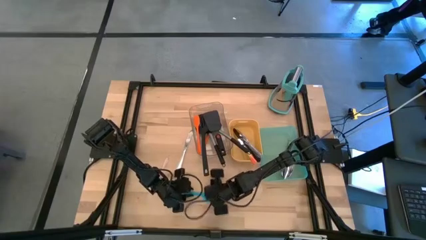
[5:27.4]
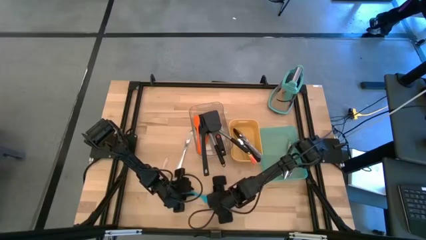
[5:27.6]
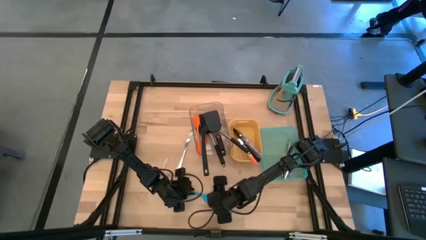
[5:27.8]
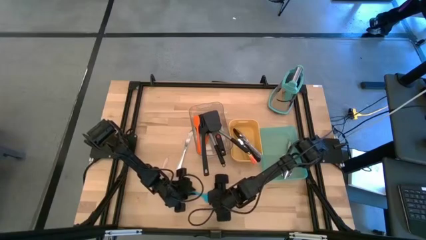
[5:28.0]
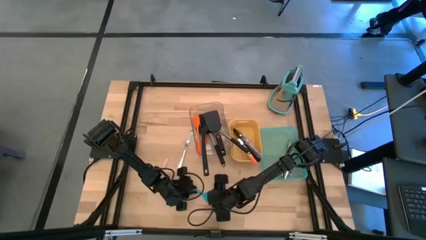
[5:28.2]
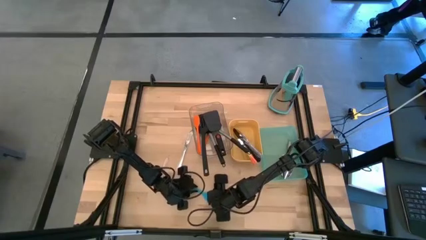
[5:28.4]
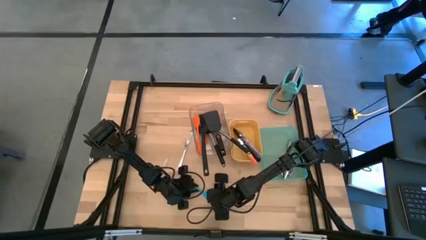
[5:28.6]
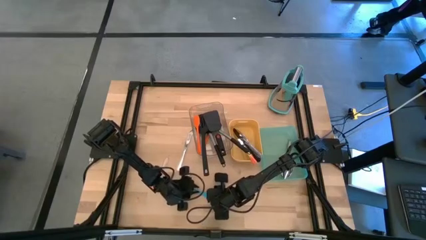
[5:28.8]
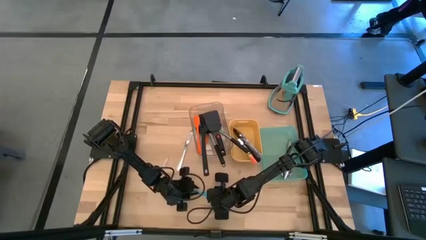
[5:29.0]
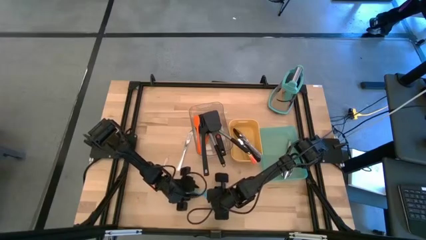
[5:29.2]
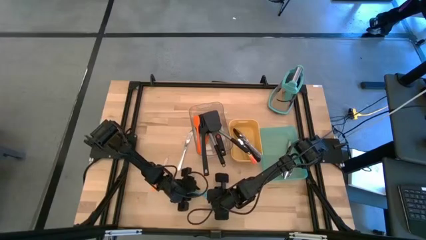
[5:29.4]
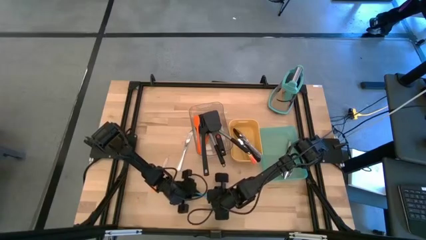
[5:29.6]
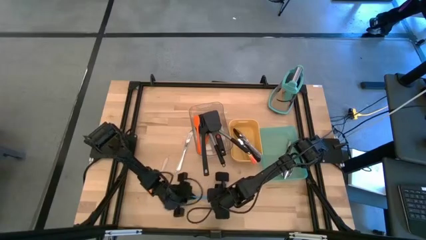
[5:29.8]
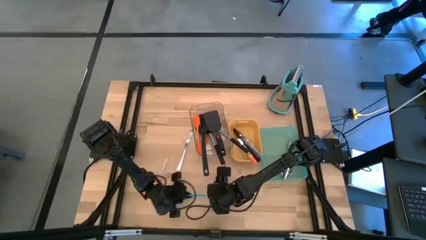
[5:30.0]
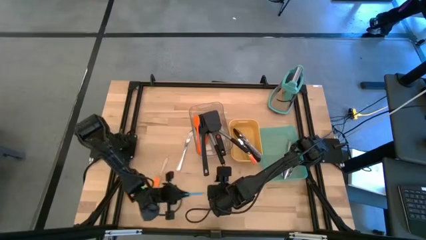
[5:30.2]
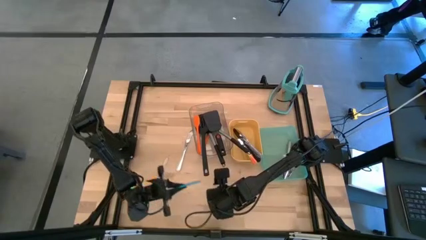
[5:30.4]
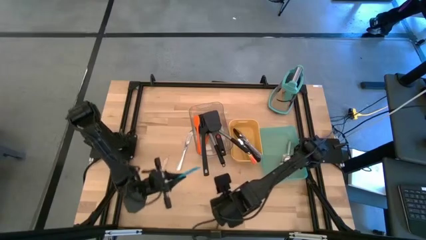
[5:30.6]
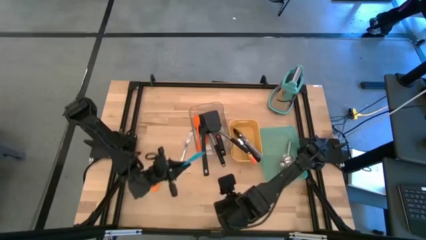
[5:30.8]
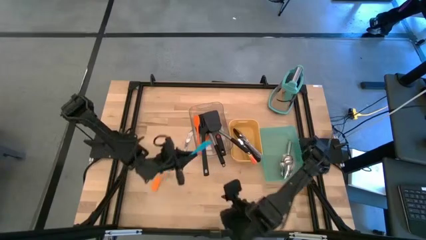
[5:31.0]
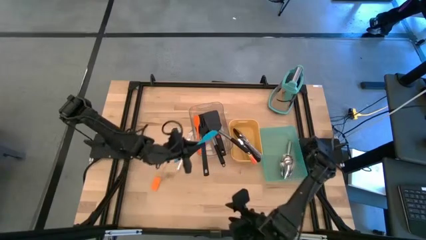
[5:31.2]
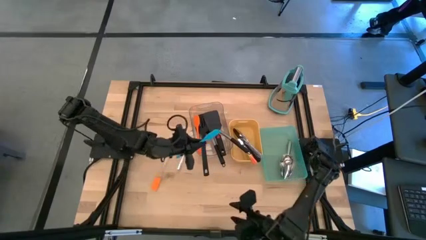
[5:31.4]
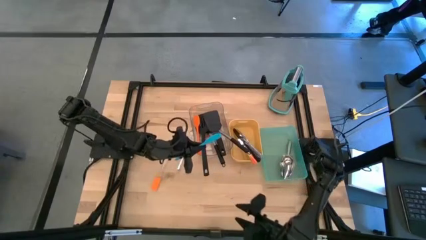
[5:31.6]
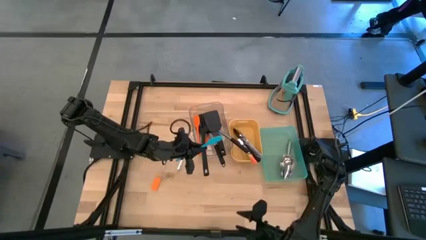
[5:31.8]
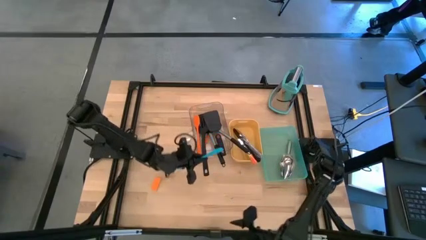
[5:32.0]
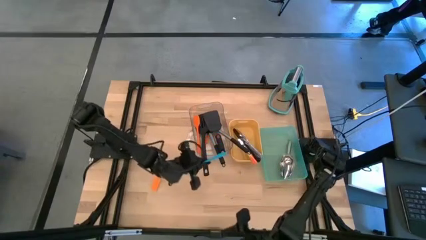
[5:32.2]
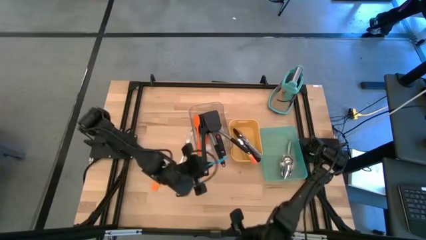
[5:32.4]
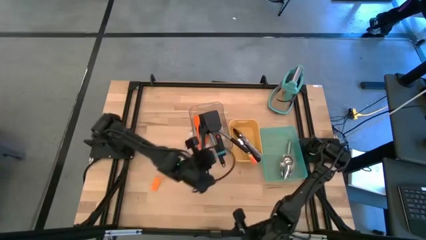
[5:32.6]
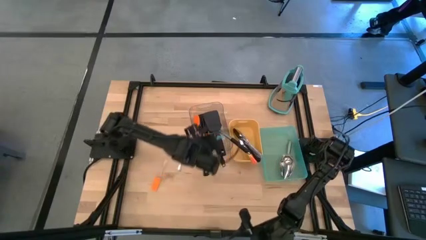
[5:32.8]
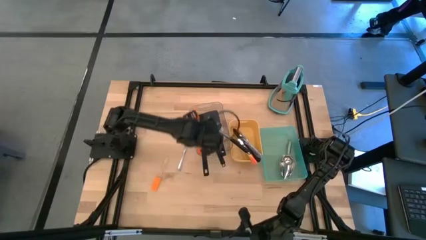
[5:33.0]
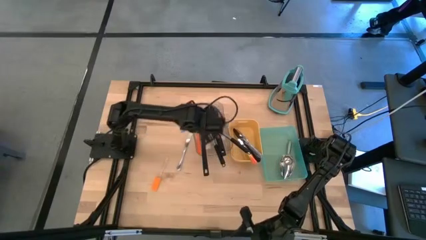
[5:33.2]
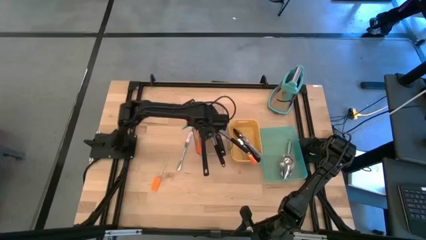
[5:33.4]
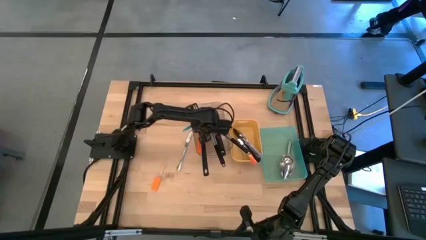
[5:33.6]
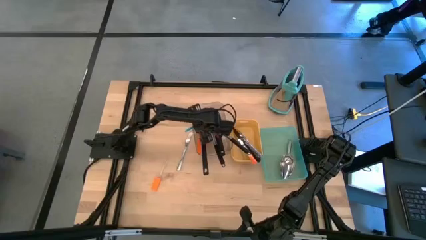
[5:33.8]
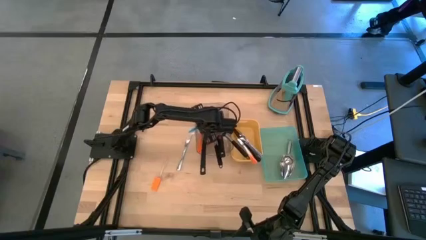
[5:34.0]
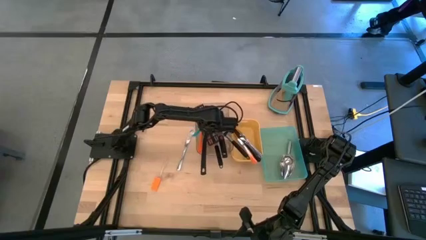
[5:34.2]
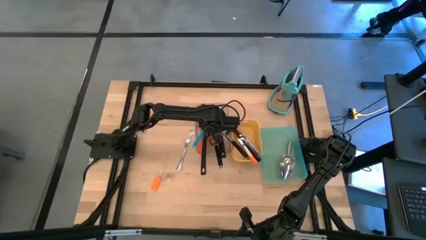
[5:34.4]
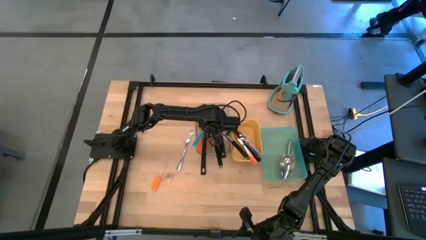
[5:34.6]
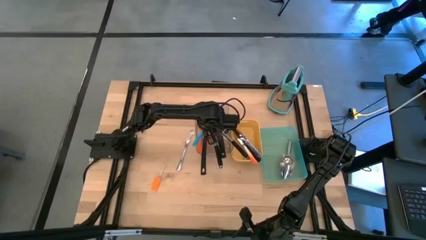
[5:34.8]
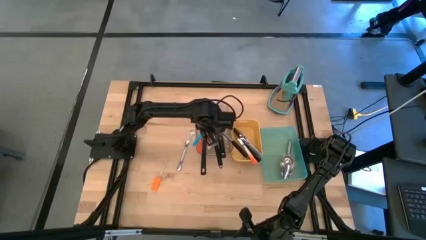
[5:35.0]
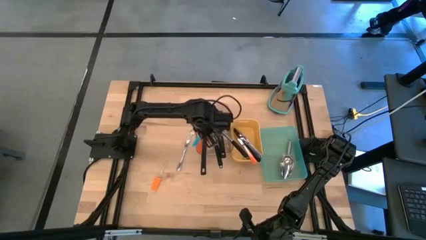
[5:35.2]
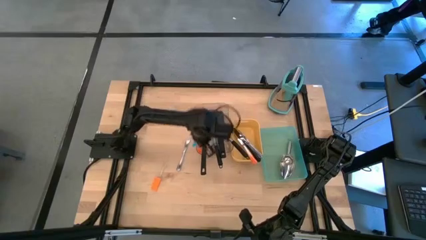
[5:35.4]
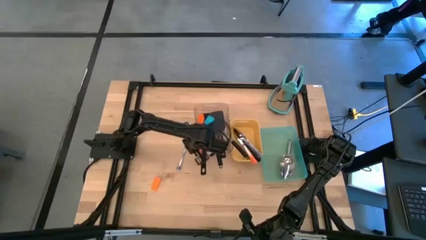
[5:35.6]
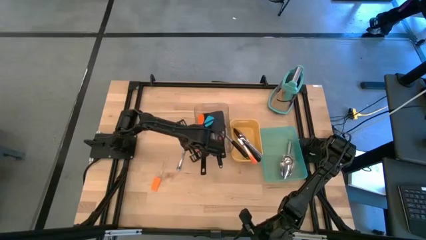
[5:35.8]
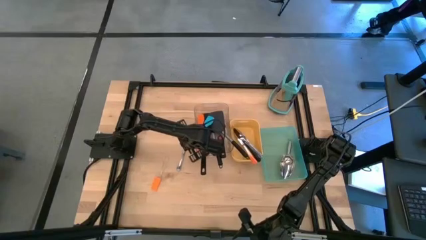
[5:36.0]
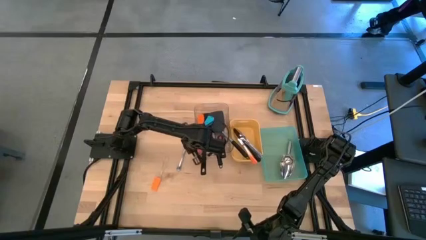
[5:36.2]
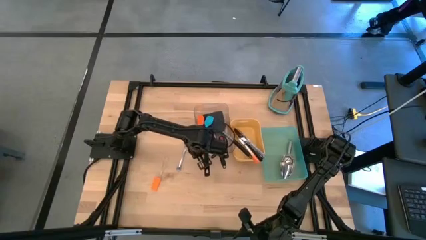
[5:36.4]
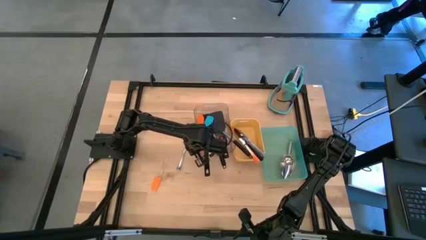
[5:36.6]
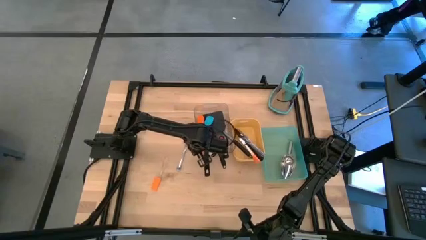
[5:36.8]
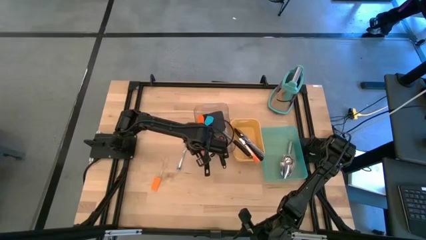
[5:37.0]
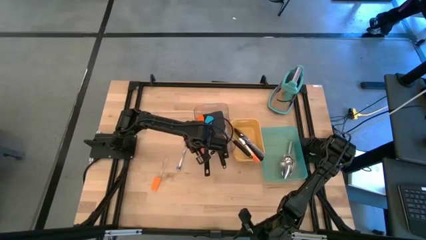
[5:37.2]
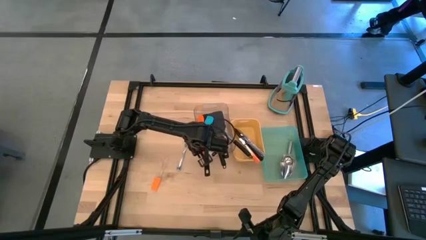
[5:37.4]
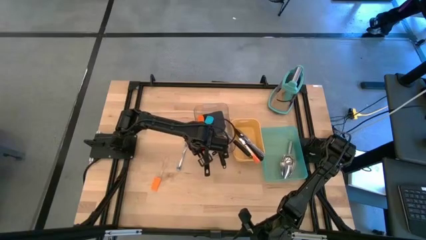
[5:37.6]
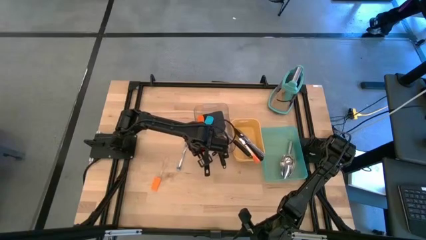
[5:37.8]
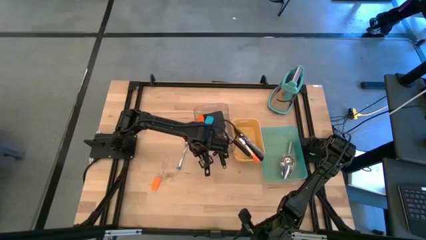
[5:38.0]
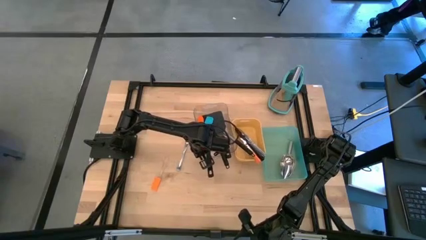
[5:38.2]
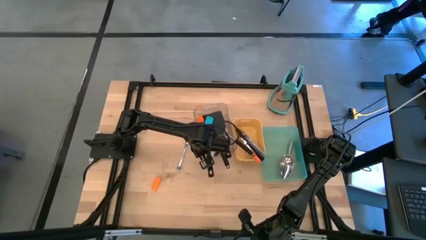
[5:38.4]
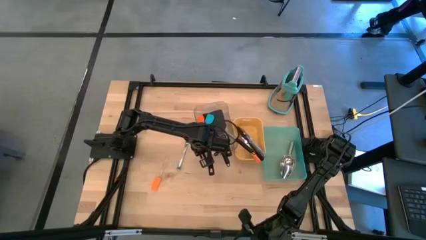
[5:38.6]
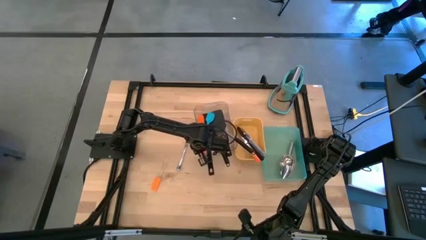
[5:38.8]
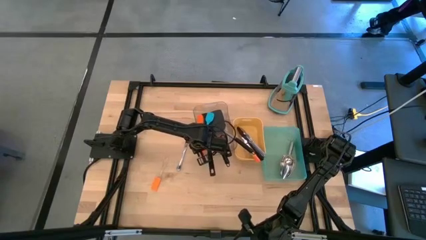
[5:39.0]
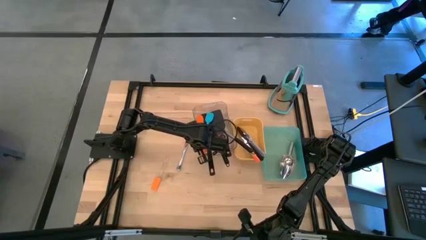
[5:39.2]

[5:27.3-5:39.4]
Task: Pick & Place Kitchen Items
Put the blue spatula into the transparent bin
